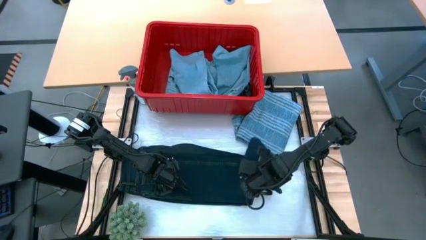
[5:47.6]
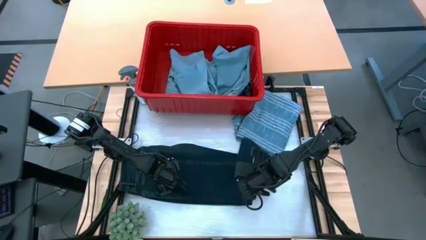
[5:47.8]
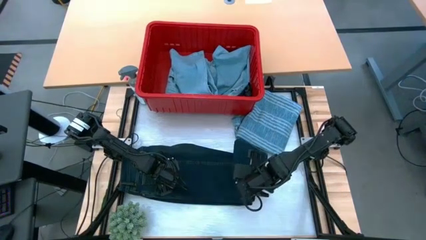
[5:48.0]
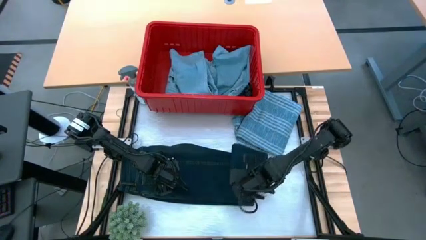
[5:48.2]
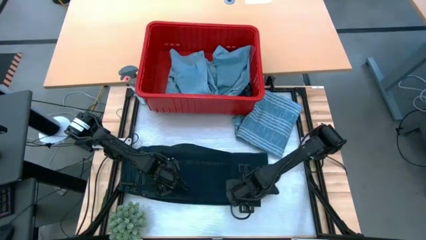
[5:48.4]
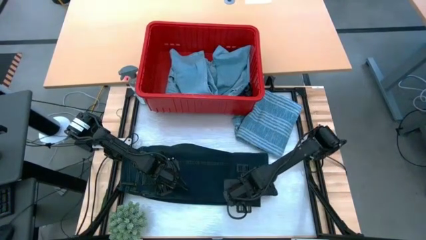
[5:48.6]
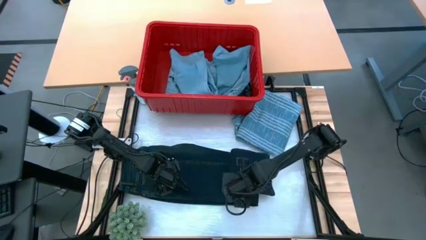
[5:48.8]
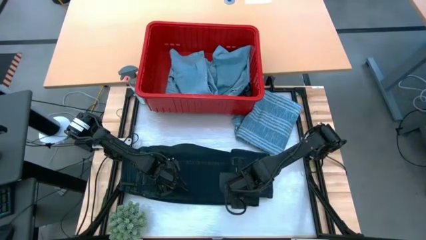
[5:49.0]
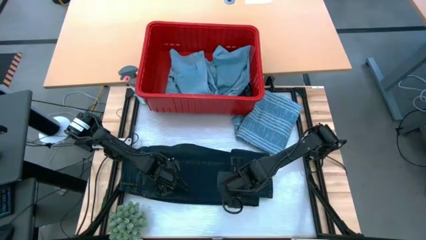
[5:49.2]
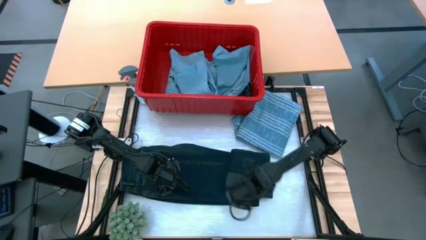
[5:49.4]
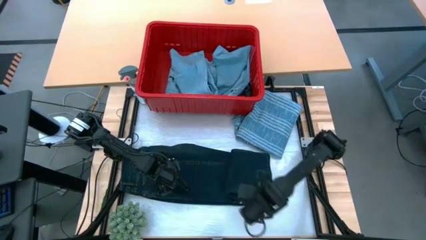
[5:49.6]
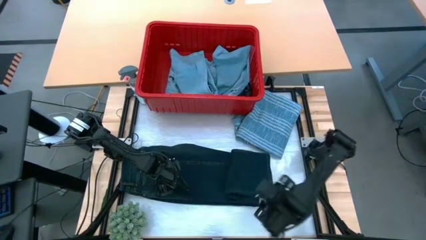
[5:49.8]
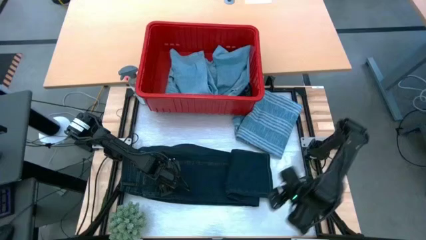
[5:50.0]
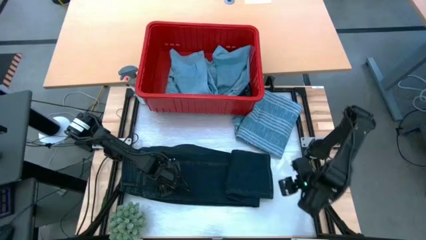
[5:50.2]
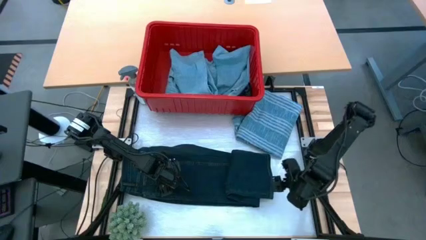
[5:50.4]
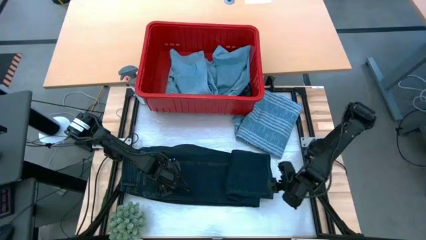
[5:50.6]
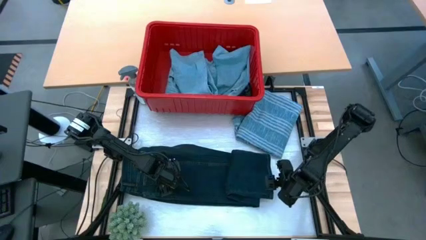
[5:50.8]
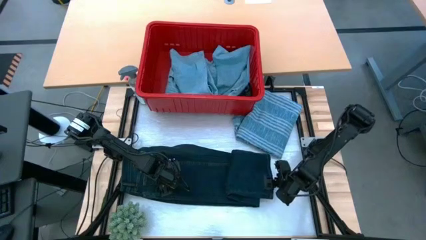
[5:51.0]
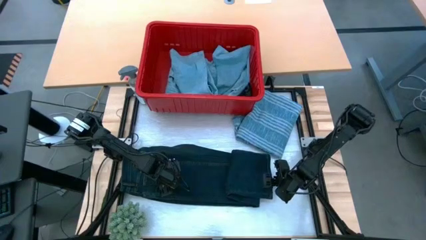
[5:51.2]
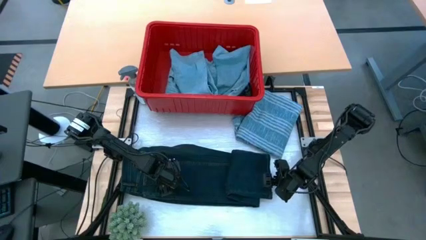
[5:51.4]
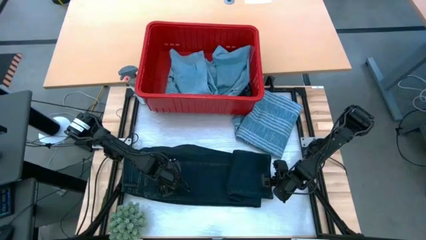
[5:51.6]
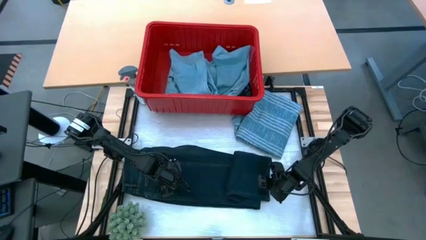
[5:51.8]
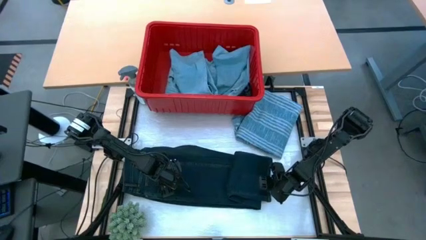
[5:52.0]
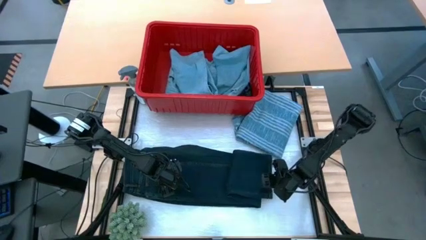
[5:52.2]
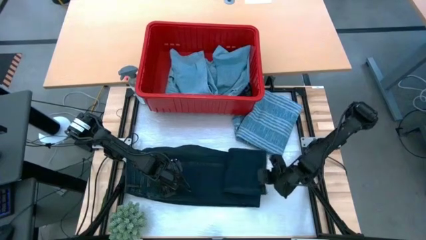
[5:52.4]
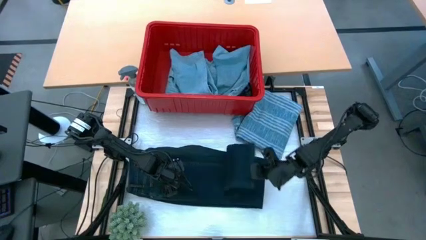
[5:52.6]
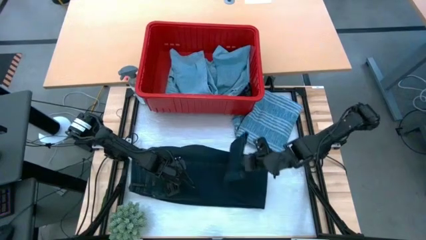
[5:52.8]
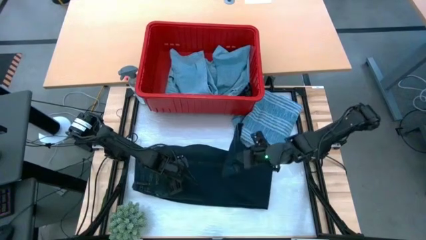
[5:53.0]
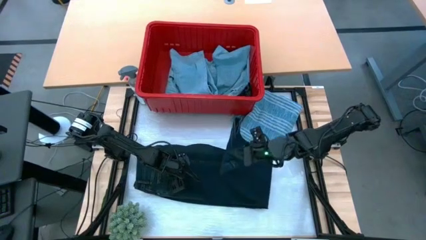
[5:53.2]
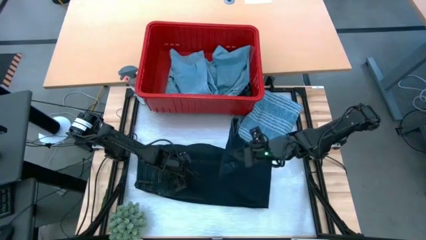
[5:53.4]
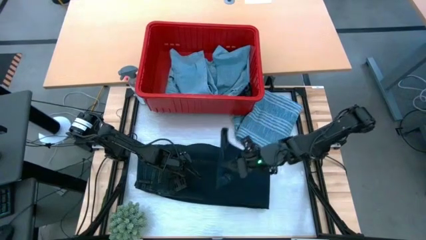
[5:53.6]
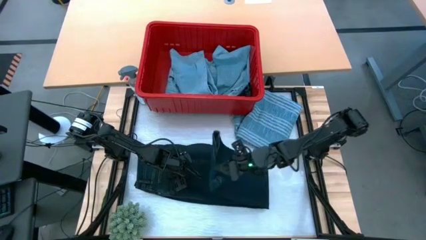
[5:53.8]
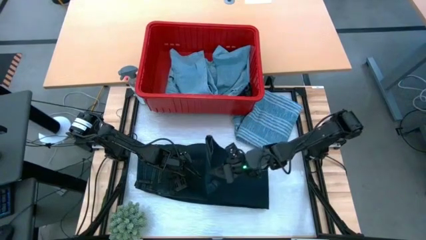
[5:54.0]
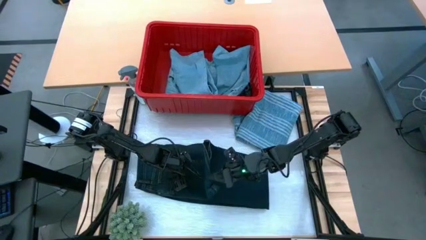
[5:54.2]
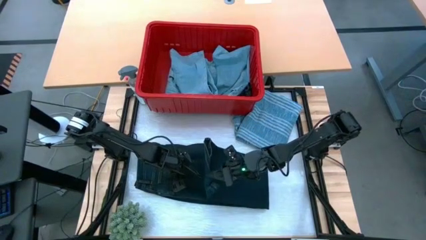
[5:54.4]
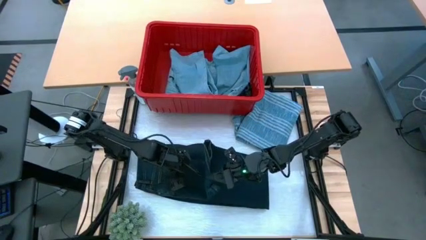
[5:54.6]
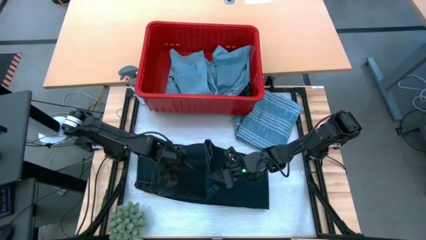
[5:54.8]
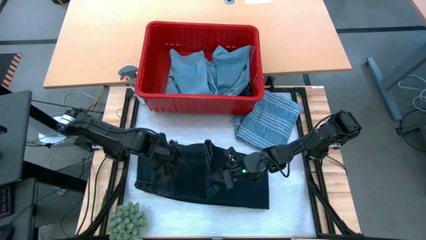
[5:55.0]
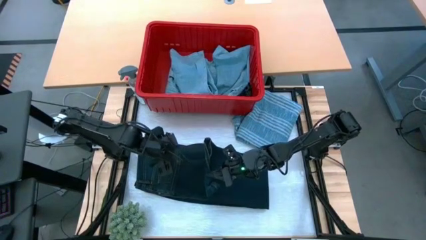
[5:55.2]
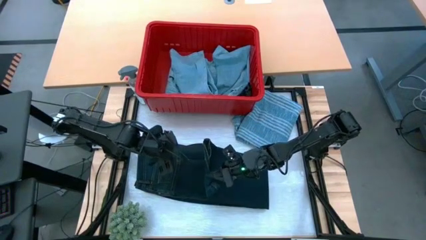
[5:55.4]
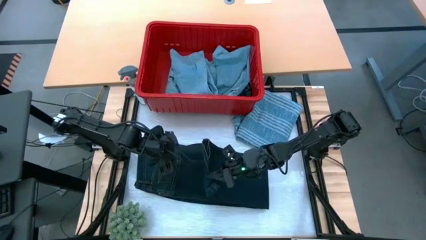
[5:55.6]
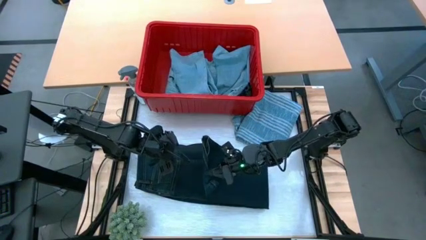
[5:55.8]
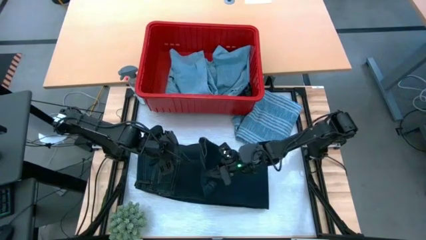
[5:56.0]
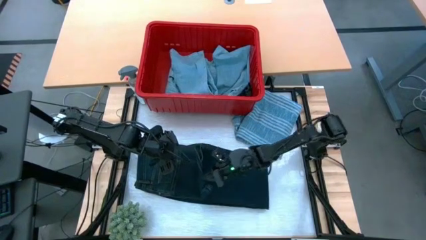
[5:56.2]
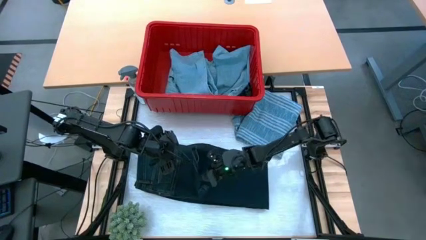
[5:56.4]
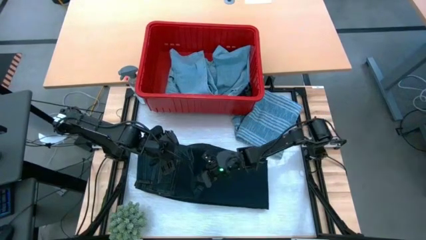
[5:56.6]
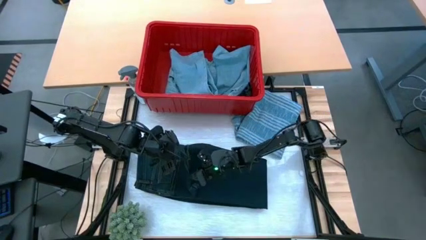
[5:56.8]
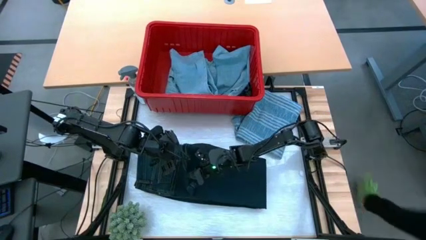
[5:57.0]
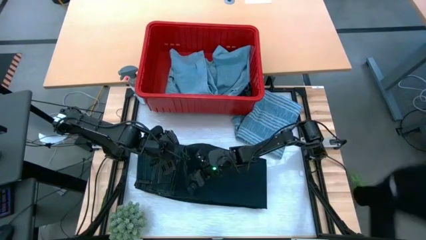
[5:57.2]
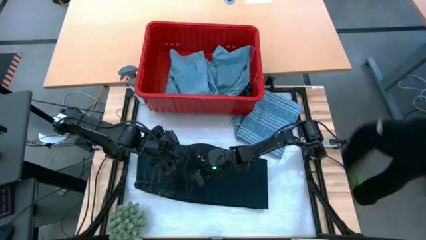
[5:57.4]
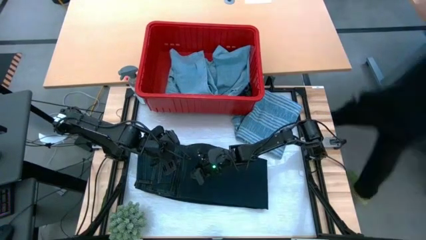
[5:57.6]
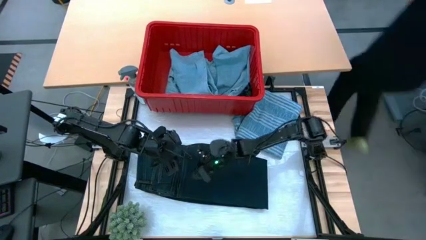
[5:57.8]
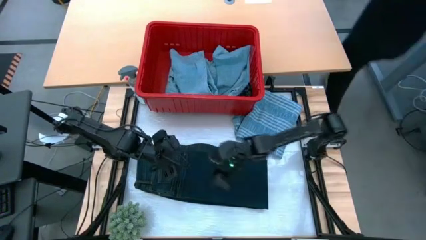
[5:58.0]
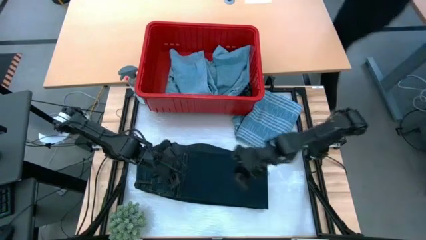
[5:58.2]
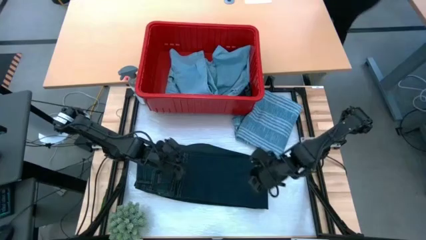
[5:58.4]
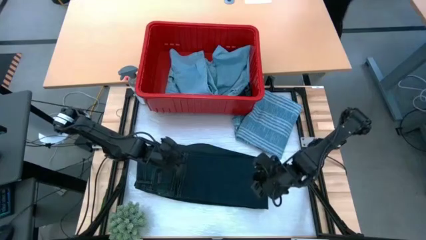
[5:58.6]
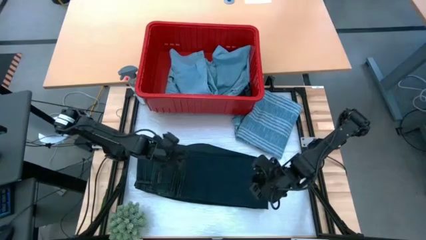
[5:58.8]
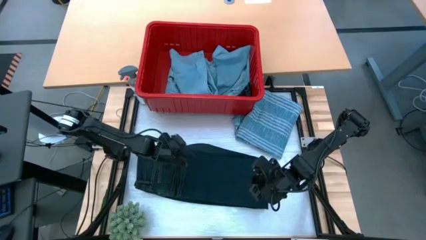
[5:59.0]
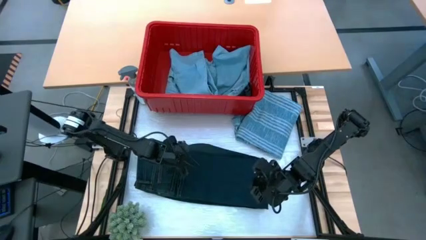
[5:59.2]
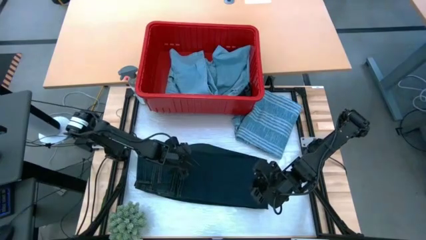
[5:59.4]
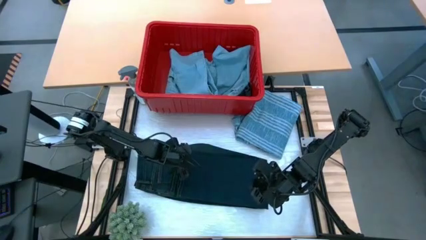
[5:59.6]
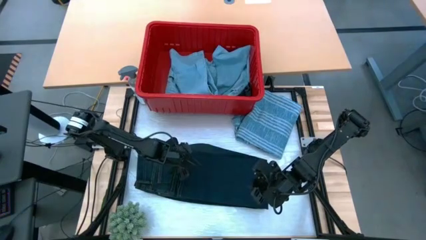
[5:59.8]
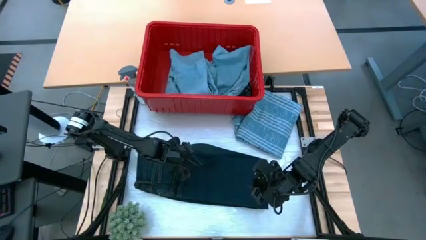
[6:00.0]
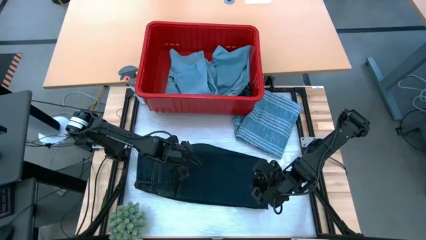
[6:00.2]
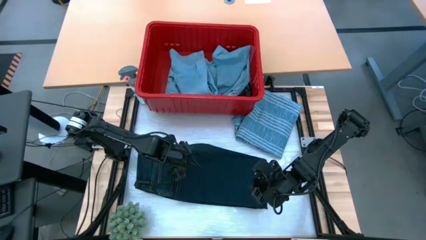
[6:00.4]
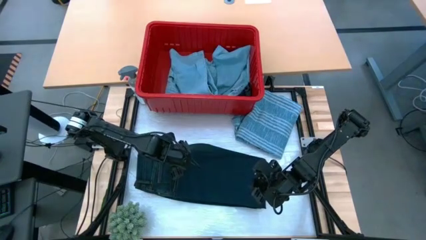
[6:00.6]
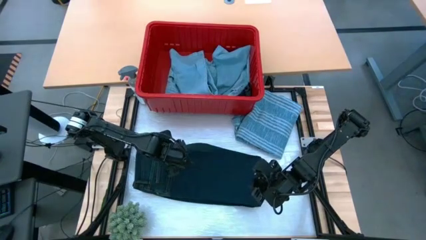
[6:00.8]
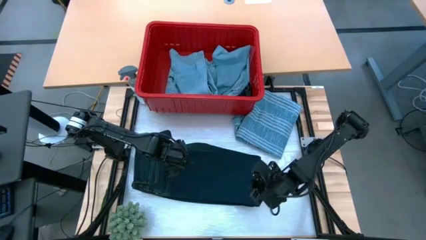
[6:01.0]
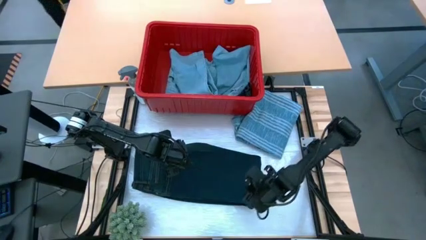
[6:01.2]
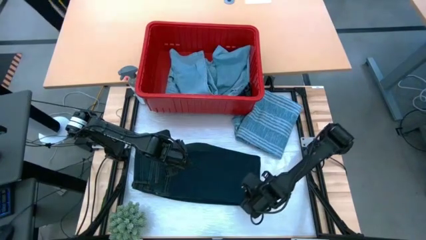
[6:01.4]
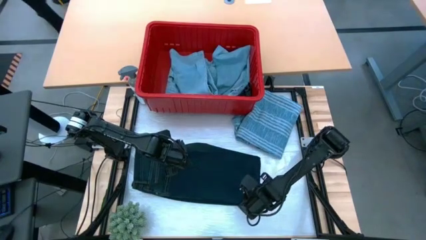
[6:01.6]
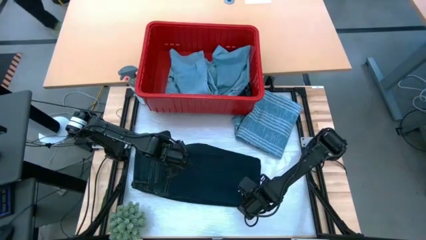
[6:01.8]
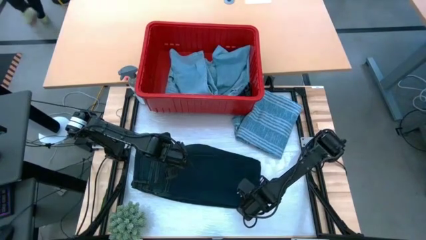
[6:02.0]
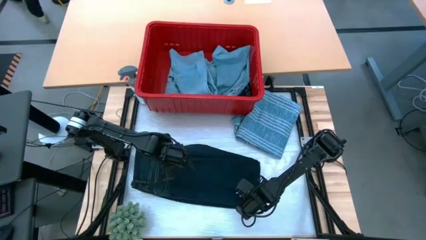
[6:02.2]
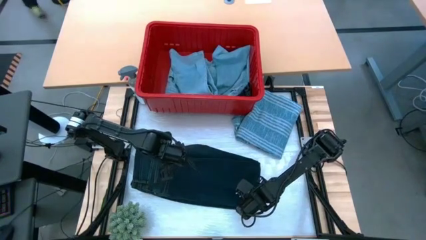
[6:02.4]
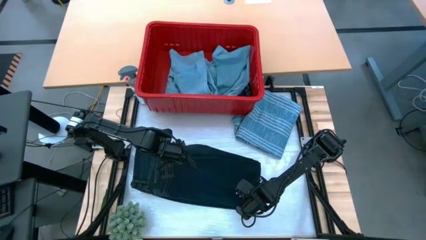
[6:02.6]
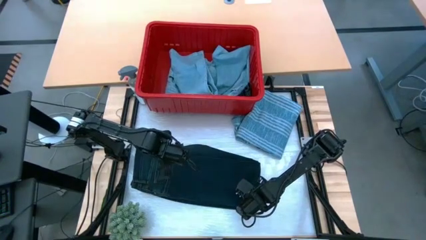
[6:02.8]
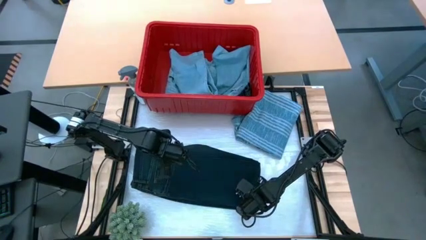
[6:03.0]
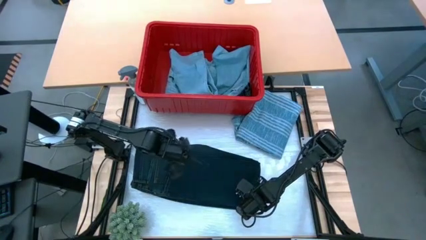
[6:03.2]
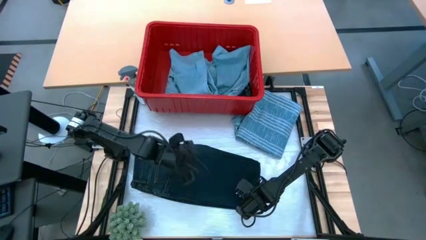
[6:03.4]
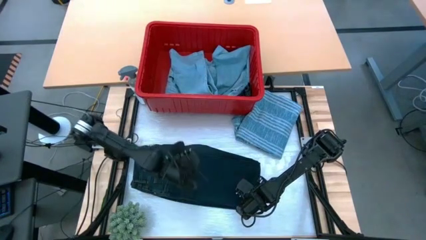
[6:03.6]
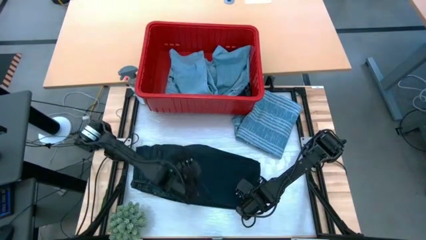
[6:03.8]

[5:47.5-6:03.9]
Task: Fold Laundry from Bin
Fold the black pants
